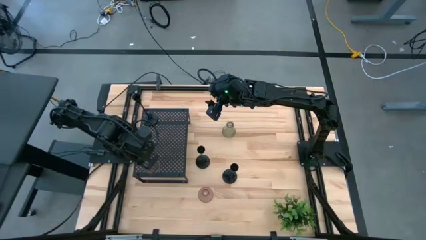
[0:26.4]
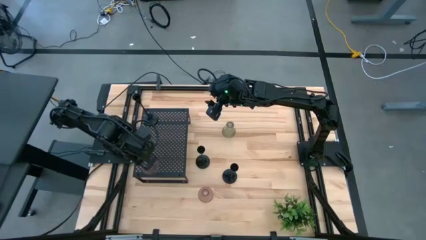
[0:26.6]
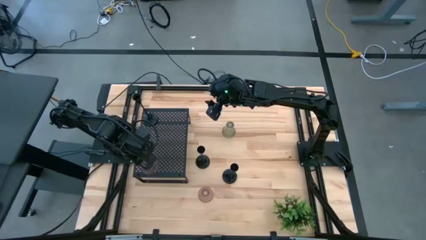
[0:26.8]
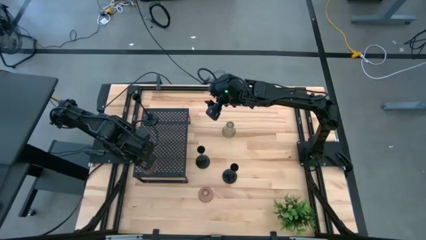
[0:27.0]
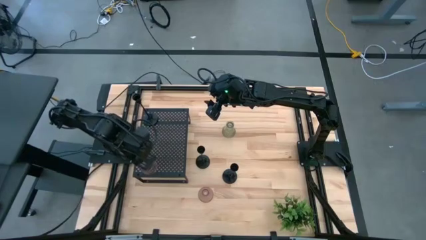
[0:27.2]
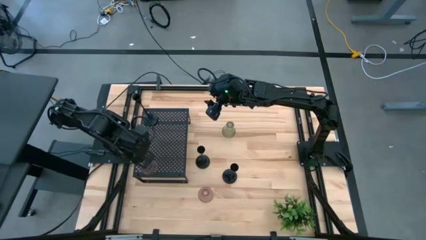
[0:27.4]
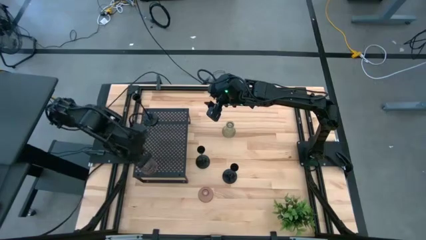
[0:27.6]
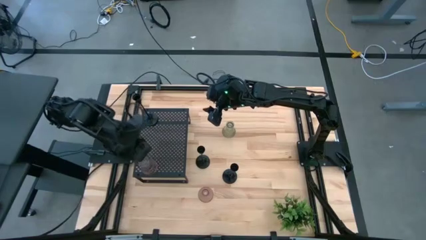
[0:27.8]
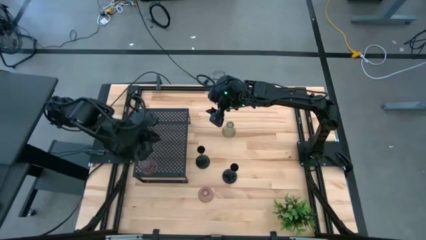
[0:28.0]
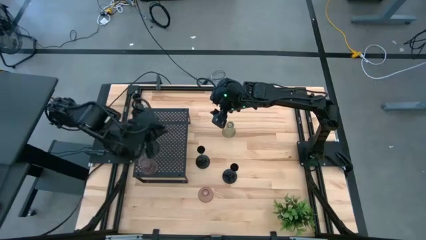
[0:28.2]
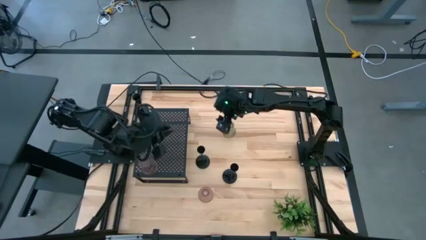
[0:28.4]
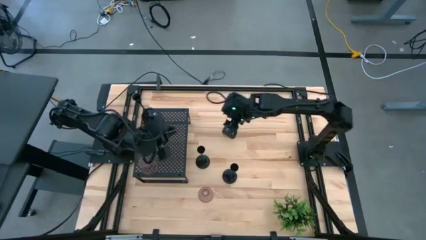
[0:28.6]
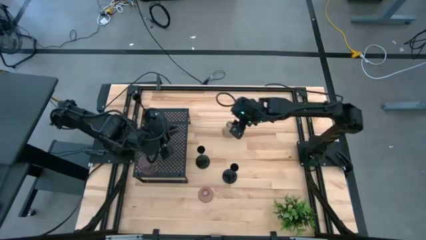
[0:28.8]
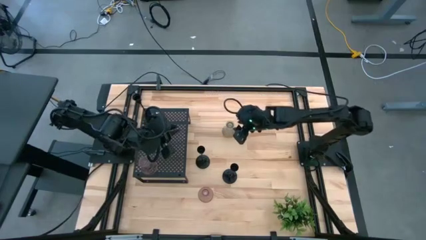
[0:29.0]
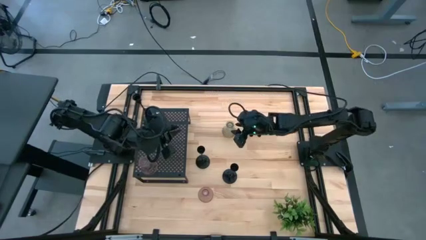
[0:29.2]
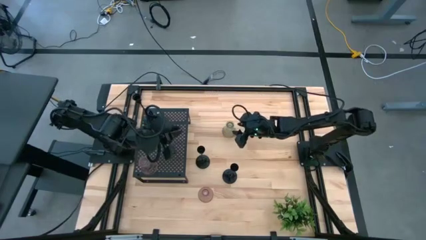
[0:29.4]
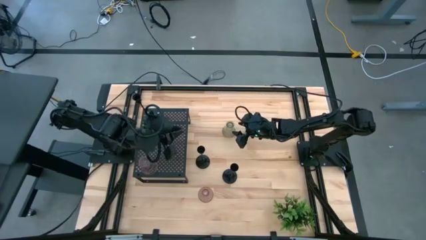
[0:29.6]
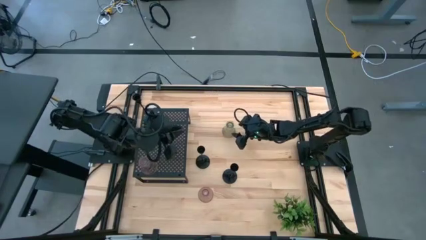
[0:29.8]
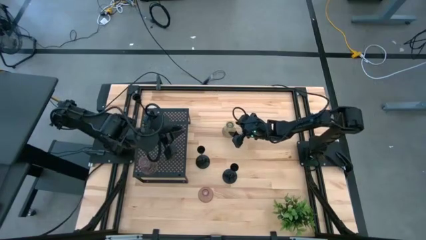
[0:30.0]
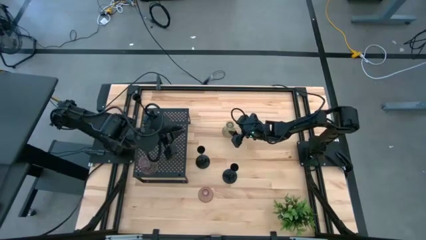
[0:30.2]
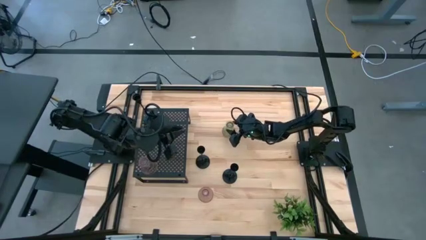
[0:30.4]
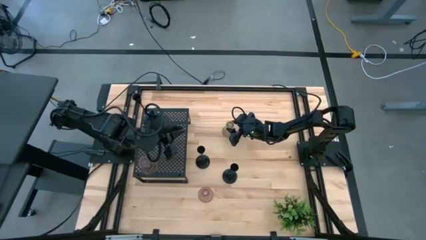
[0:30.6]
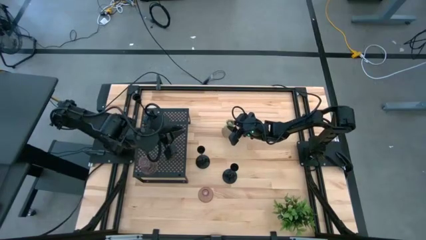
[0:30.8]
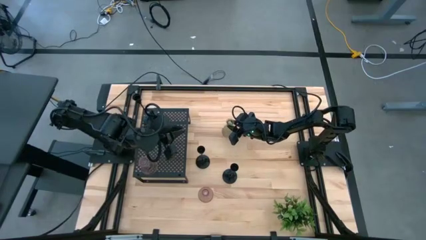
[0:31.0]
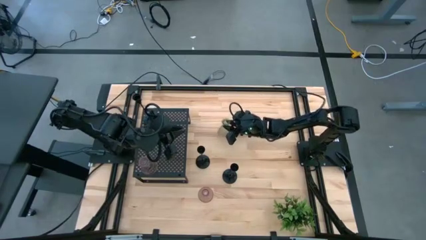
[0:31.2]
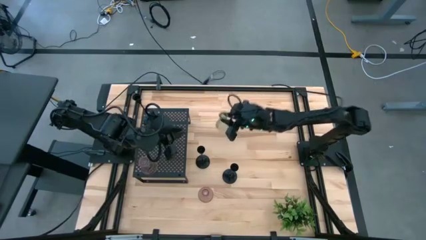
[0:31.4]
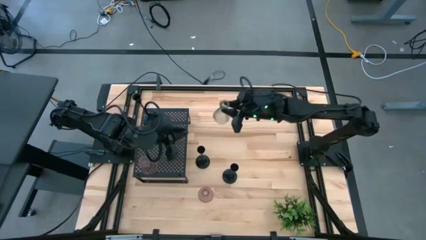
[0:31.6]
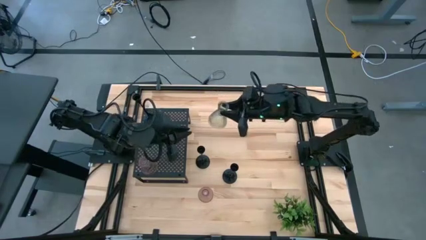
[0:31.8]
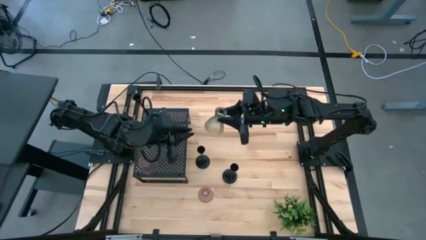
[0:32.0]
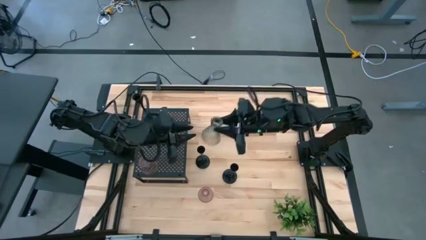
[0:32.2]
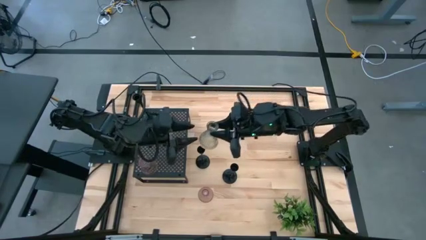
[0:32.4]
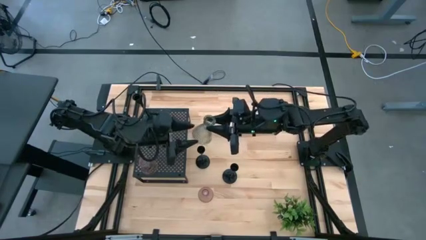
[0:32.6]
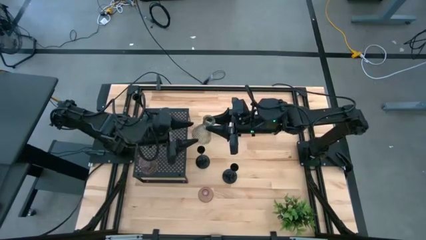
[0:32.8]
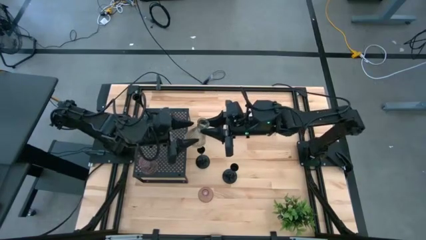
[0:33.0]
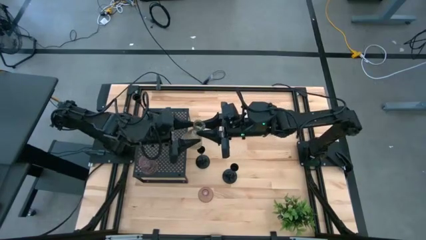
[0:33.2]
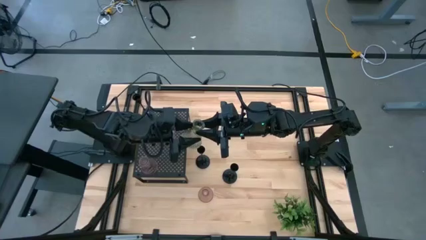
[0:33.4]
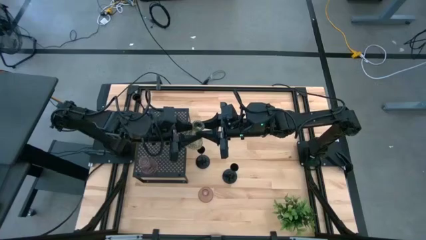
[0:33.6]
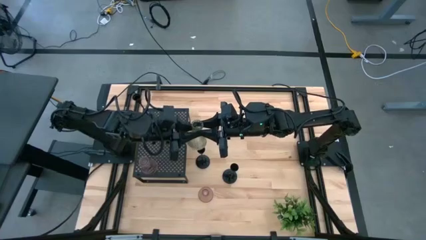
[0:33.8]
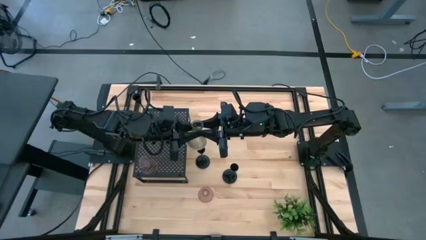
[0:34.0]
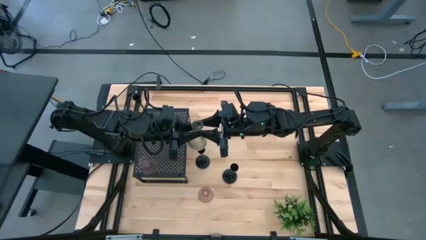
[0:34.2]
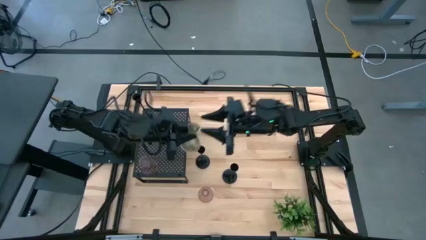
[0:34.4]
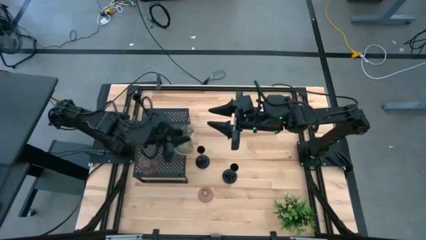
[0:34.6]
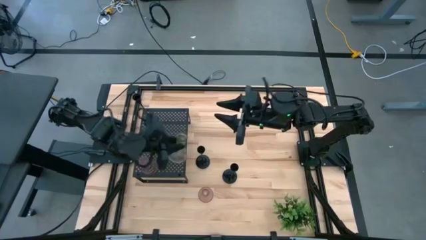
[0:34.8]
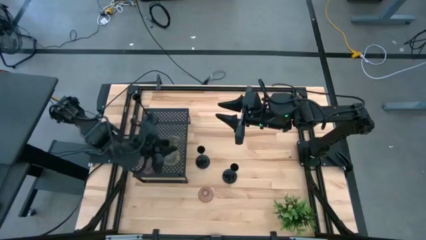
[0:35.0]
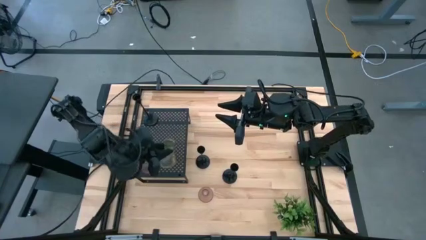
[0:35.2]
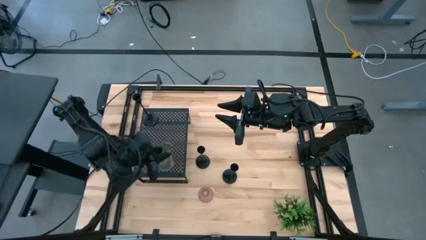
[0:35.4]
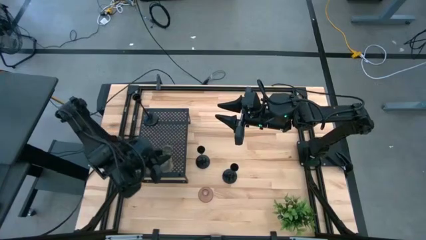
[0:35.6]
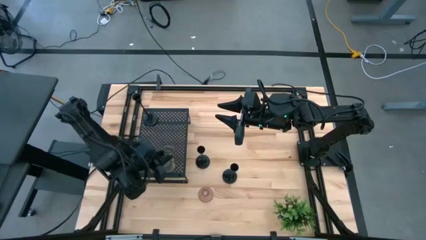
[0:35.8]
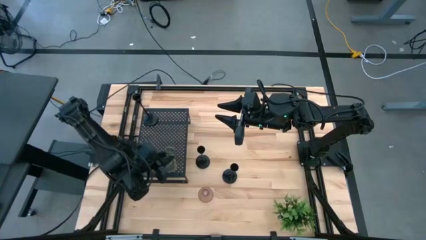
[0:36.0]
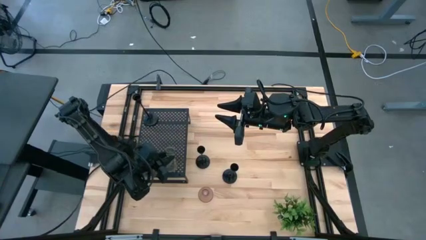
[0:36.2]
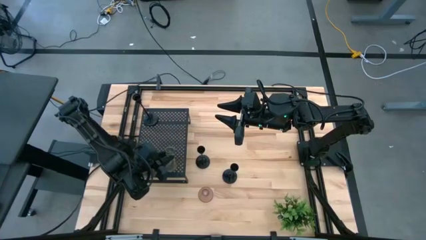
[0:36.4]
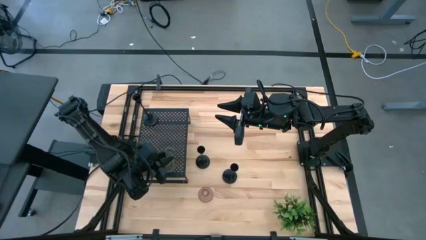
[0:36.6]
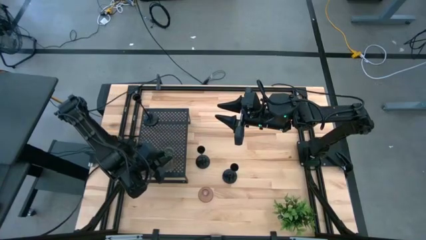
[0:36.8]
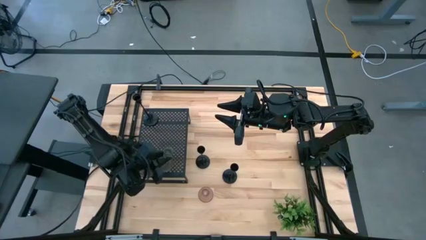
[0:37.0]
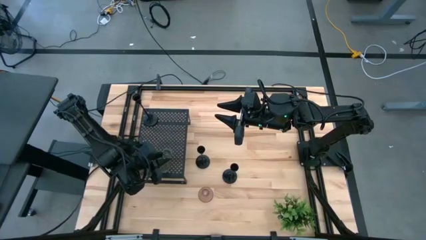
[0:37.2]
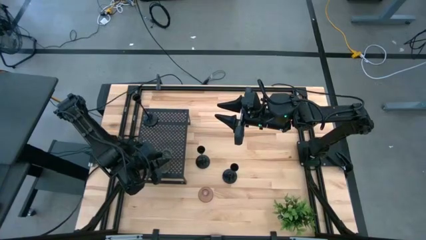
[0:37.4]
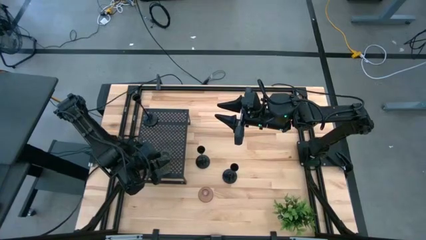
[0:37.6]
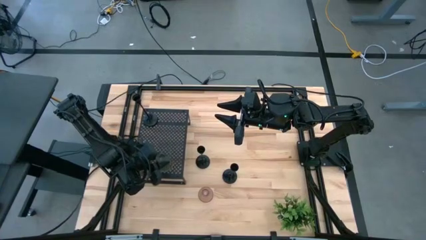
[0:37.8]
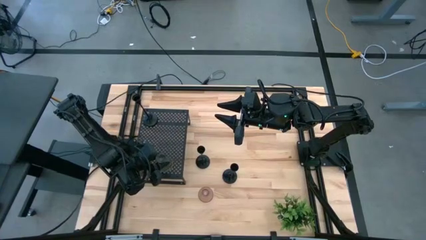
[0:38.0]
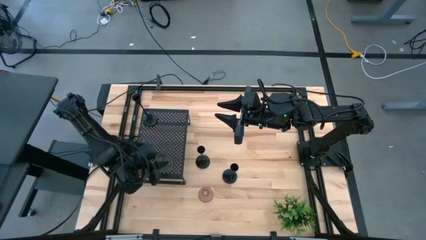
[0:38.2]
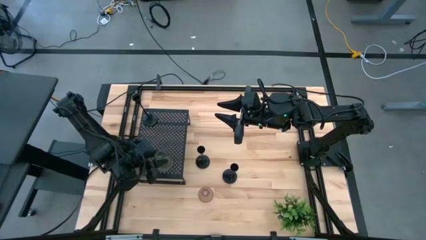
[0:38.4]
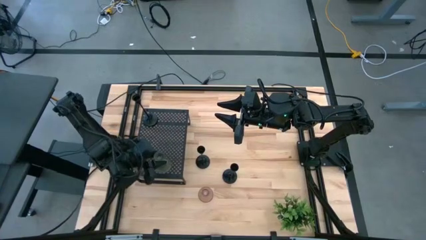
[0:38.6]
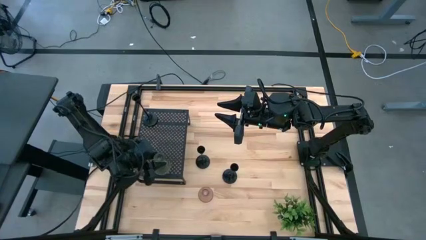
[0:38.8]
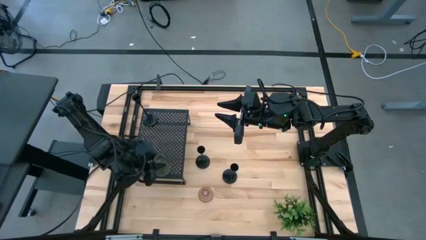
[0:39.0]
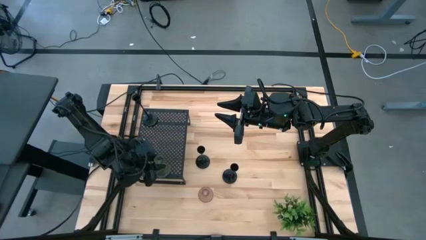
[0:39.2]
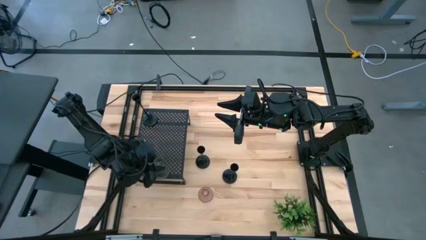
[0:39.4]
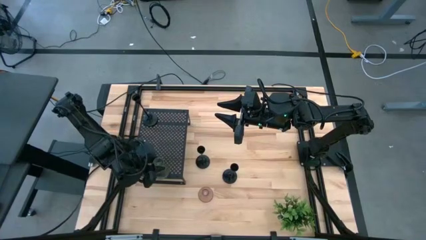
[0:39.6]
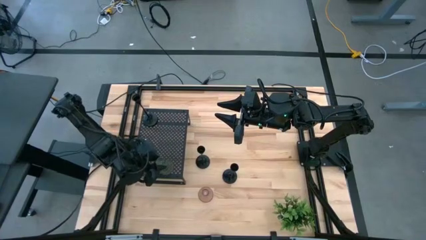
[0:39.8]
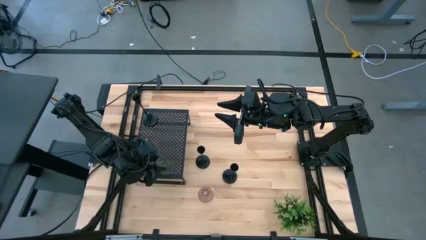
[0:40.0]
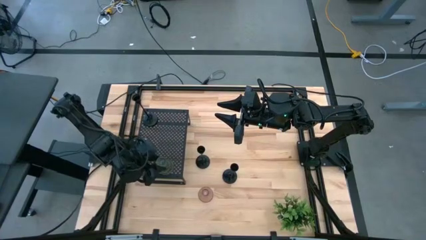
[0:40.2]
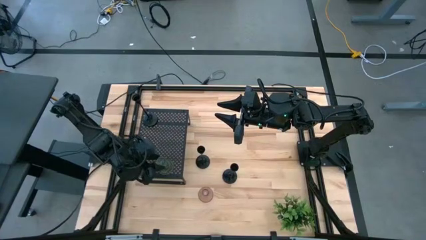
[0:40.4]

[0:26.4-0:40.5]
Task: Pick & Place candle stick holders
Put the green glass candle holder on the shelf

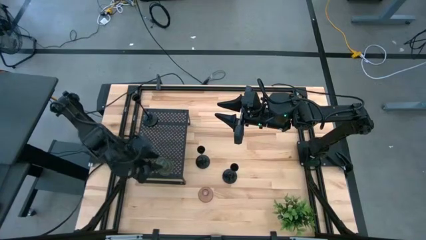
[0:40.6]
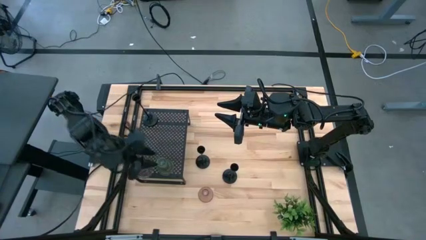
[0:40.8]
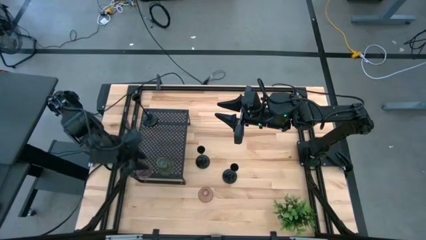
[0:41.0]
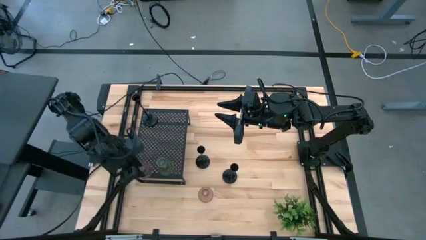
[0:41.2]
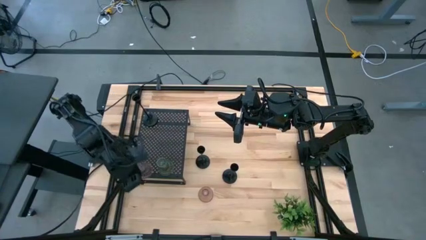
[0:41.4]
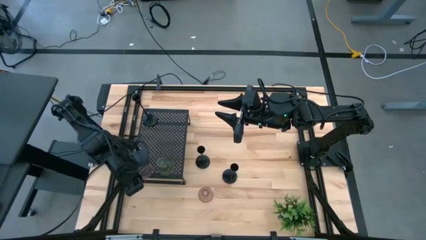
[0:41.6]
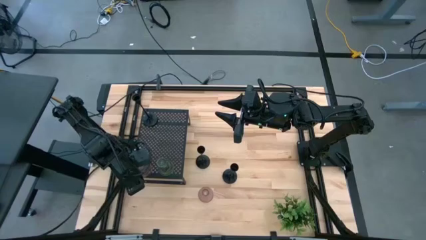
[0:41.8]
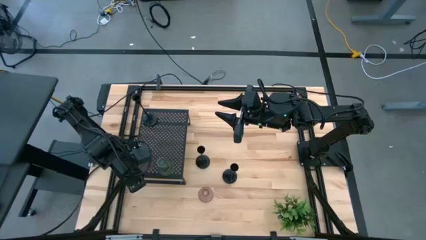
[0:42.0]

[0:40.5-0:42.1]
Adjust the purple glass candle holder on the shelf
